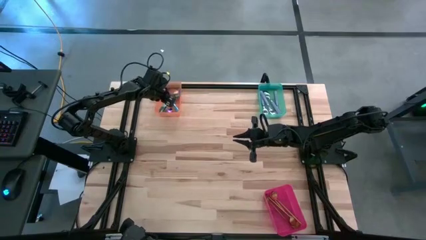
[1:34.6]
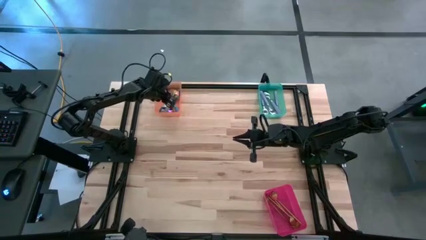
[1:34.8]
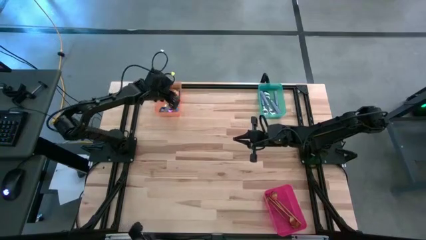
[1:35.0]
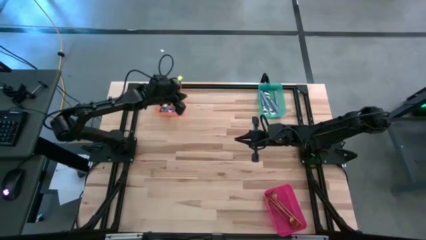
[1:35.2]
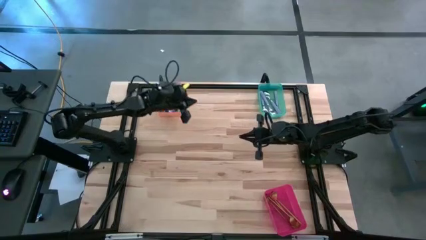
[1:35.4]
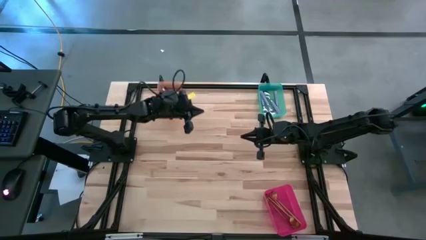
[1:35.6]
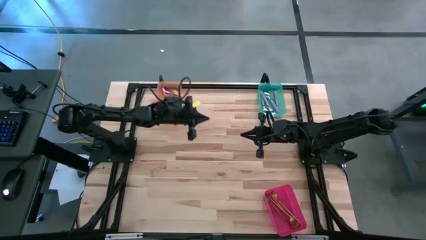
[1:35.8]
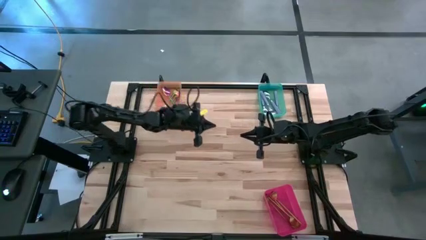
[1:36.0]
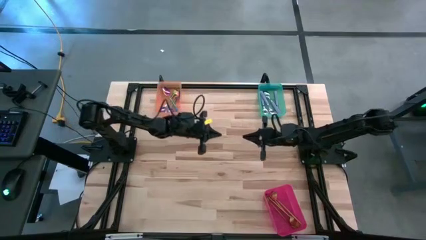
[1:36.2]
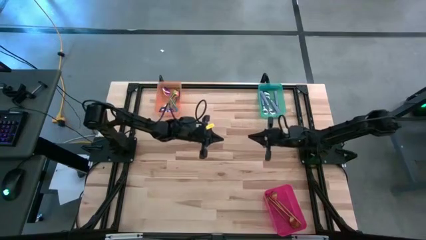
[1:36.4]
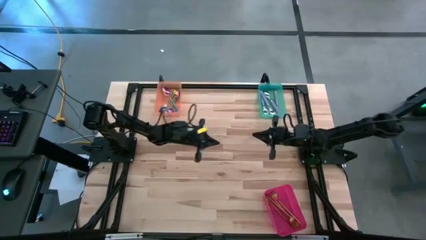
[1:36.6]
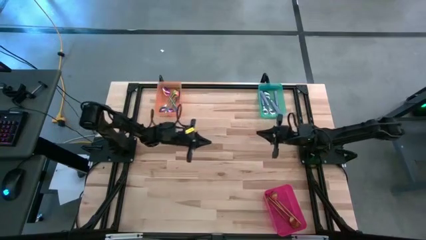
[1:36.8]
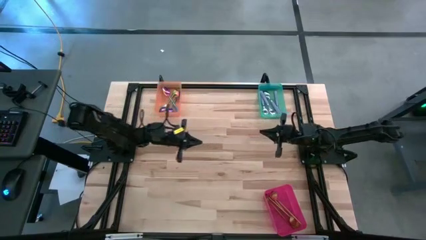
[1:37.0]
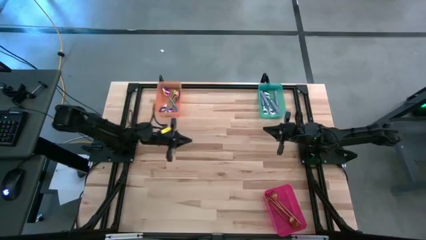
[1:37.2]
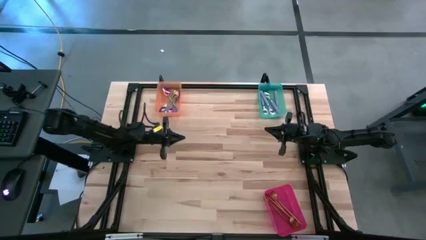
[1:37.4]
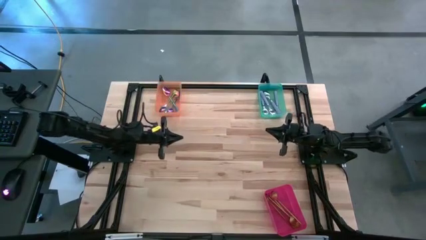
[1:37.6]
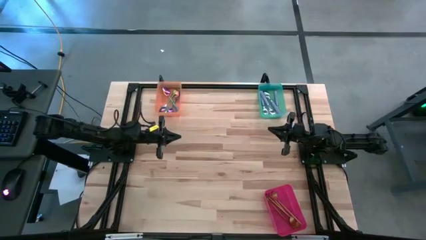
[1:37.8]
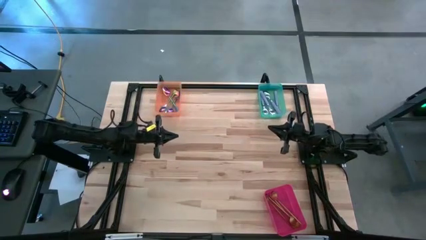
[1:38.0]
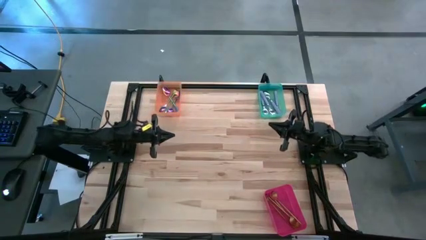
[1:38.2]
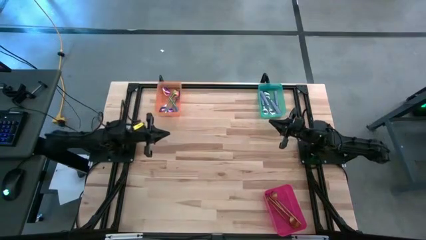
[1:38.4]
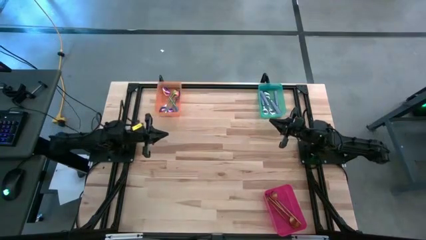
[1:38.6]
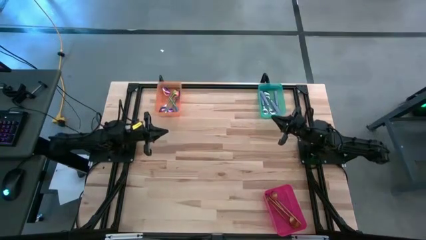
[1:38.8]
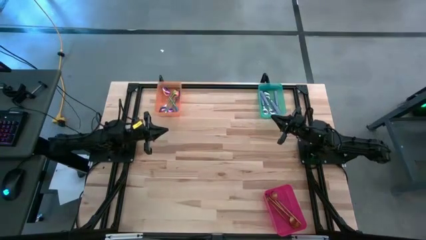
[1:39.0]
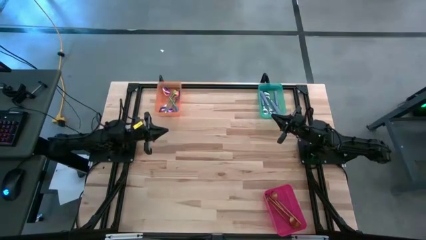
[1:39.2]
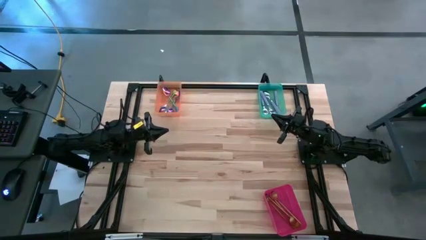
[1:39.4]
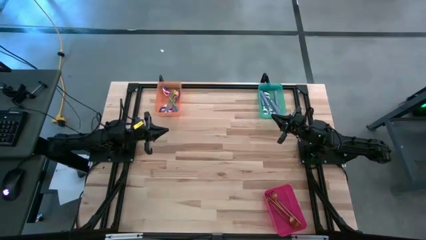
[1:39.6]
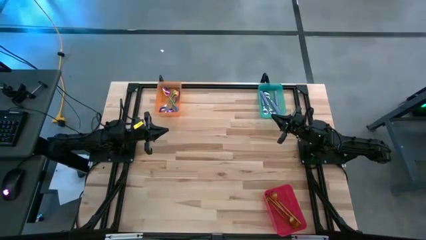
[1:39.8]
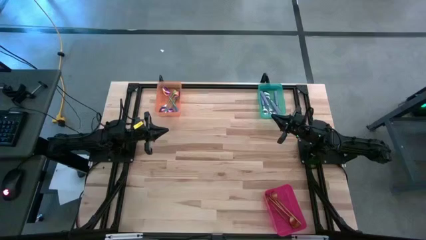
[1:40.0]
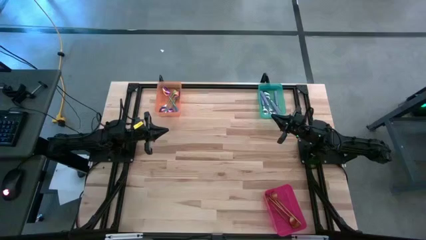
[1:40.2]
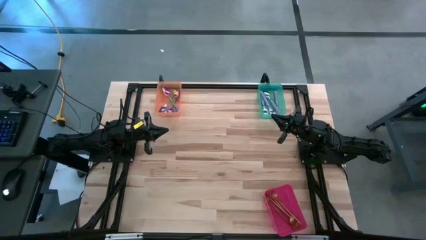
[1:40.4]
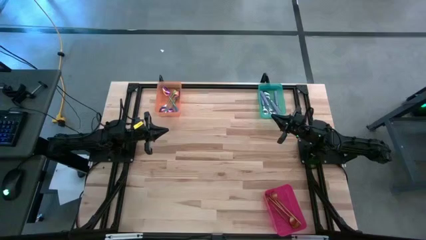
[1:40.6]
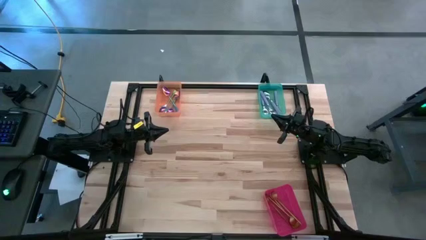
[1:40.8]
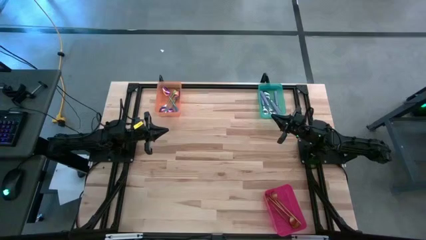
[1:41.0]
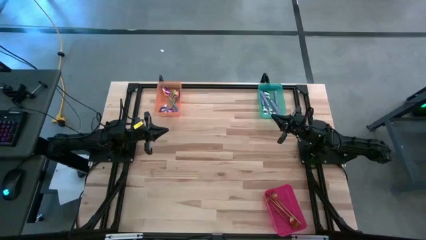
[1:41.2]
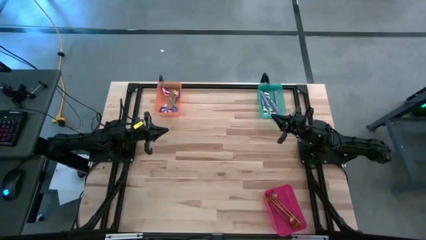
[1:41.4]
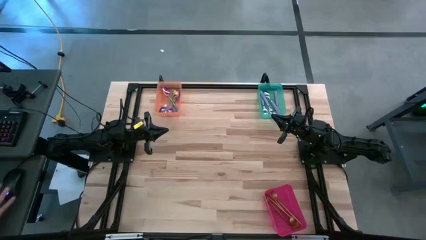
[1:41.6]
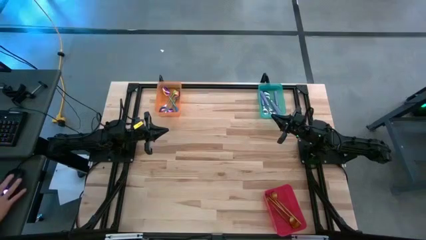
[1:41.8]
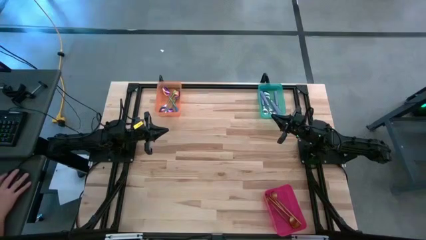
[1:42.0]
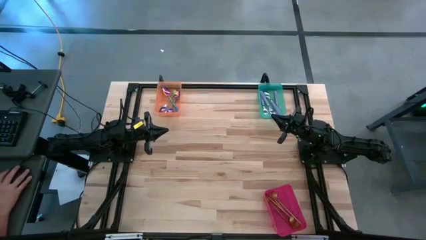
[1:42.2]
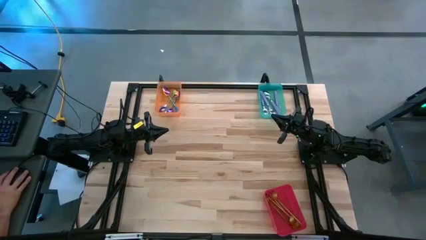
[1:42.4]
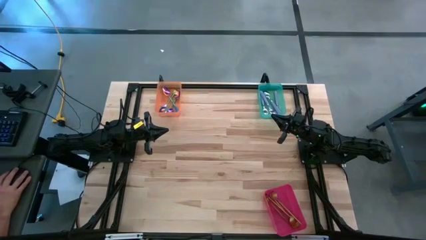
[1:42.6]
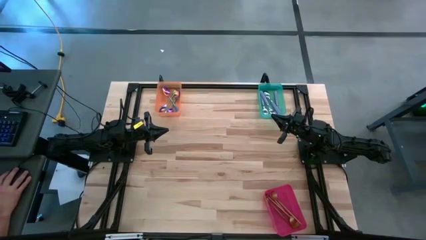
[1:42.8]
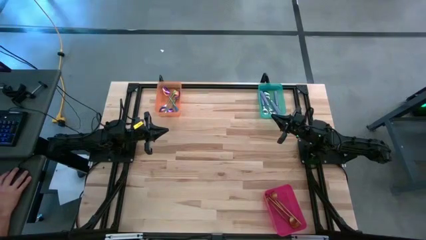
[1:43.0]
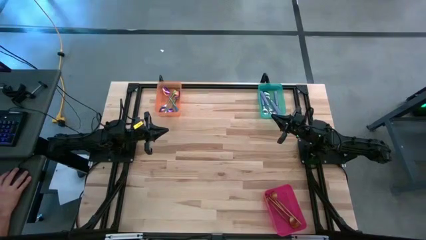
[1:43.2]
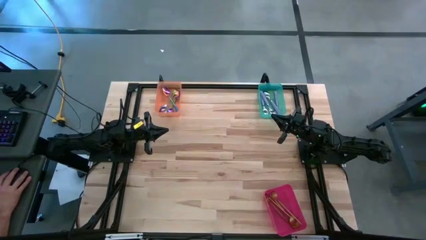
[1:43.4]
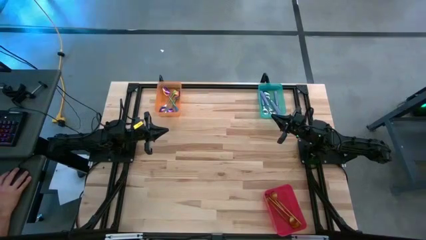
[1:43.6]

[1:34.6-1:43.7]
Task: Sort silverware by color (type)
Return to Home Position

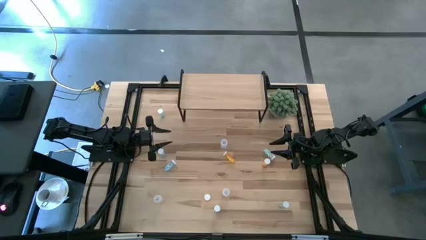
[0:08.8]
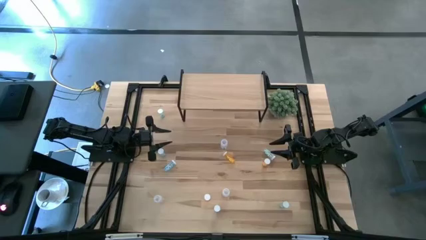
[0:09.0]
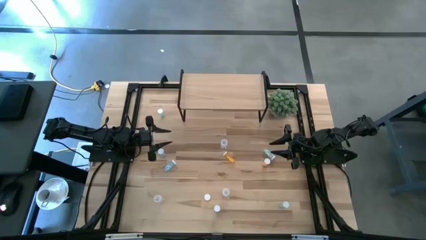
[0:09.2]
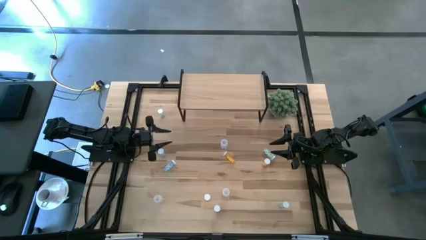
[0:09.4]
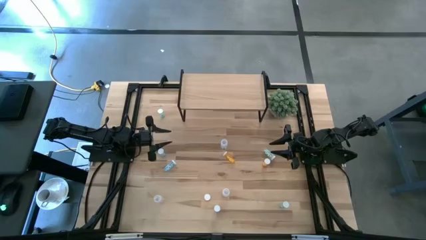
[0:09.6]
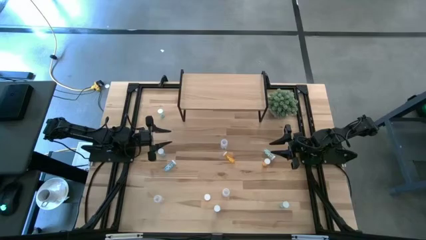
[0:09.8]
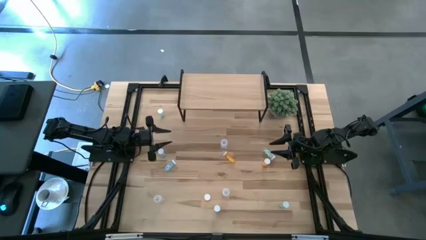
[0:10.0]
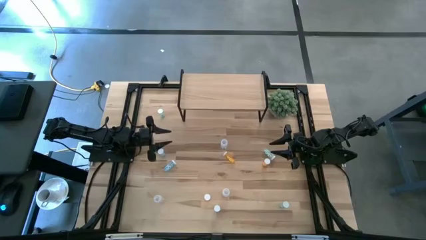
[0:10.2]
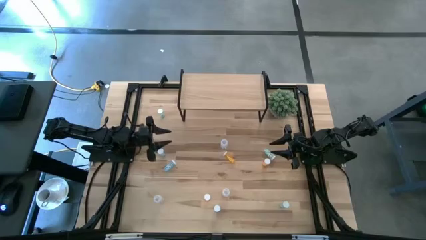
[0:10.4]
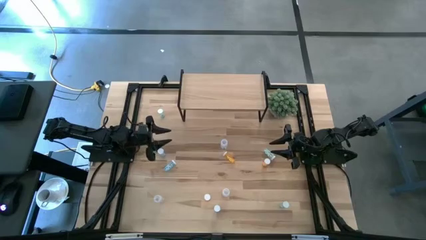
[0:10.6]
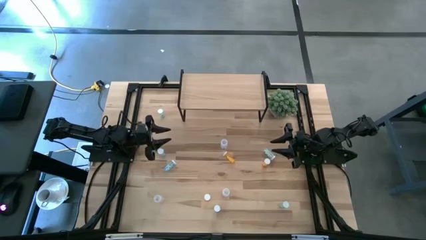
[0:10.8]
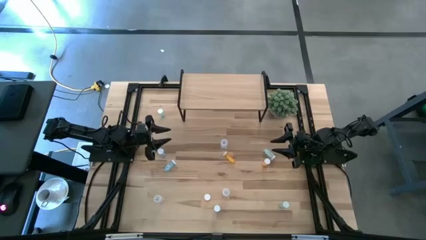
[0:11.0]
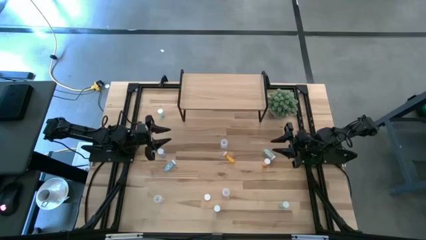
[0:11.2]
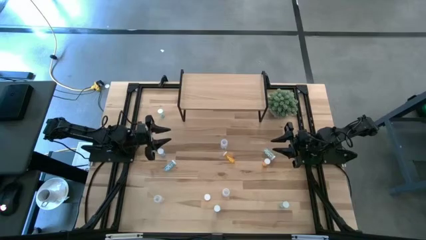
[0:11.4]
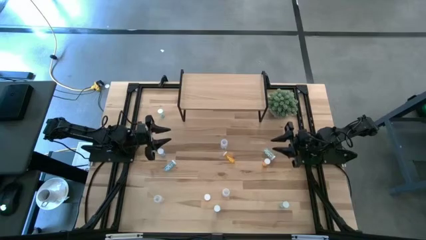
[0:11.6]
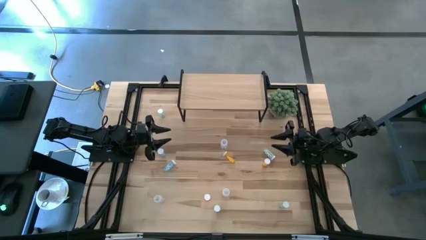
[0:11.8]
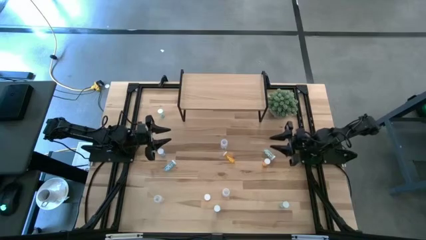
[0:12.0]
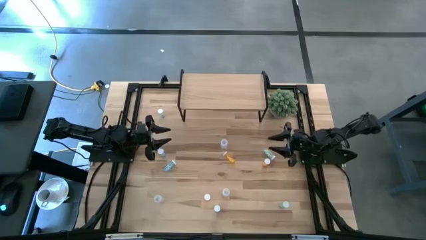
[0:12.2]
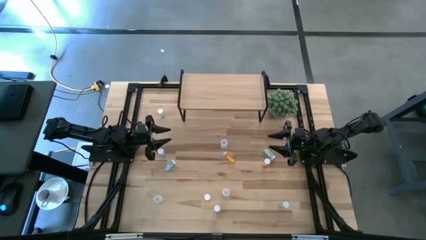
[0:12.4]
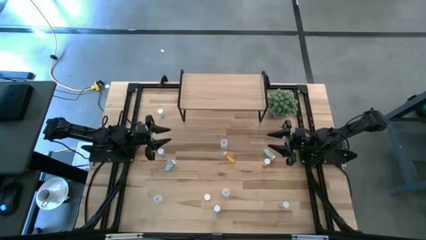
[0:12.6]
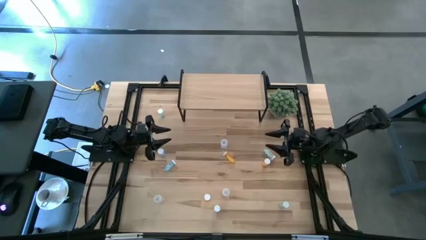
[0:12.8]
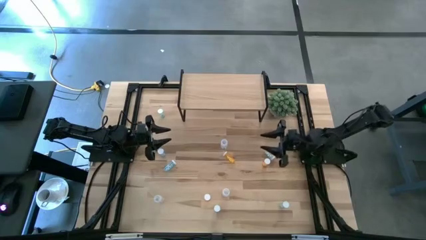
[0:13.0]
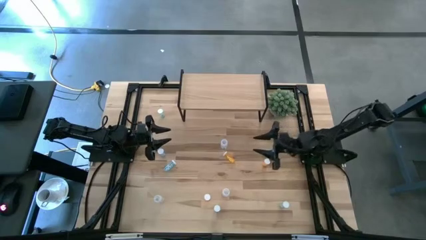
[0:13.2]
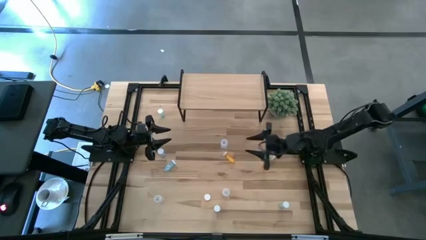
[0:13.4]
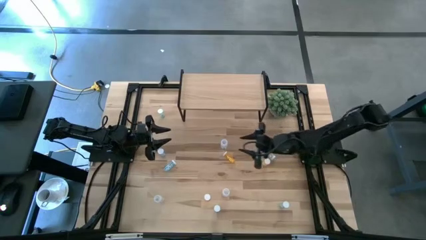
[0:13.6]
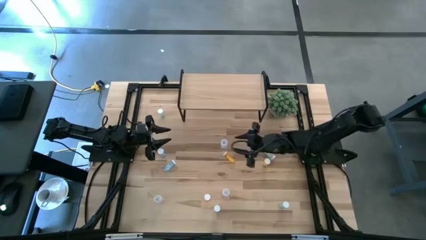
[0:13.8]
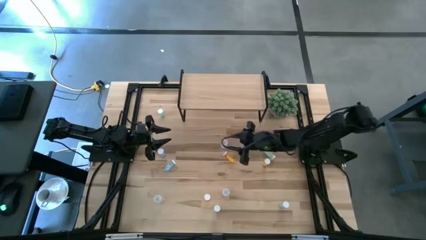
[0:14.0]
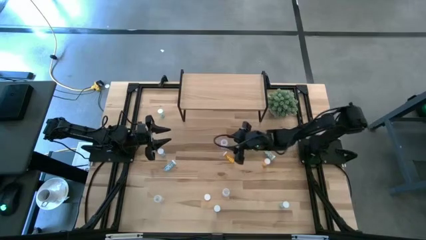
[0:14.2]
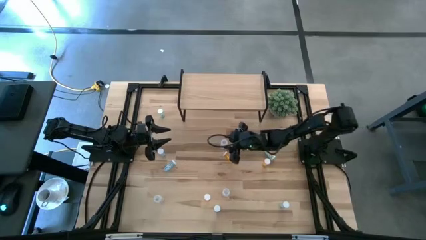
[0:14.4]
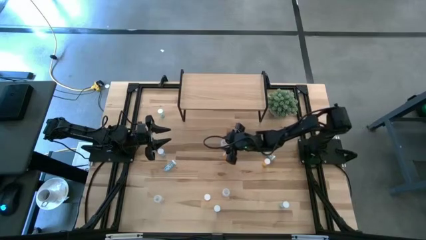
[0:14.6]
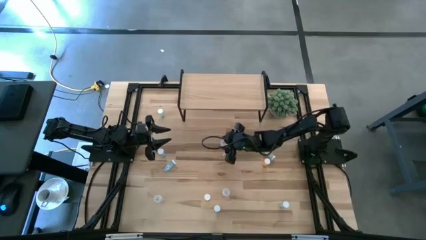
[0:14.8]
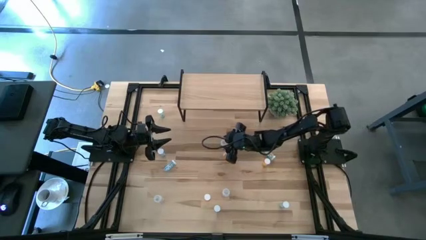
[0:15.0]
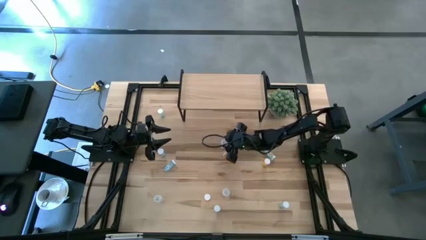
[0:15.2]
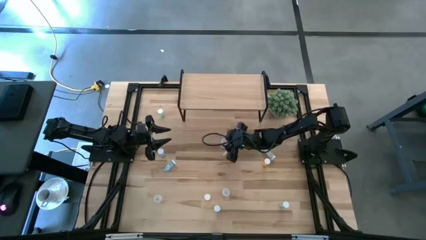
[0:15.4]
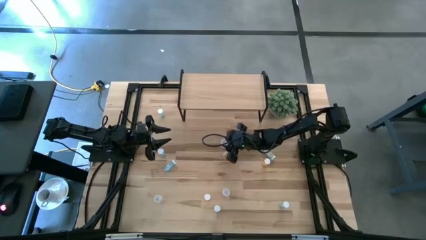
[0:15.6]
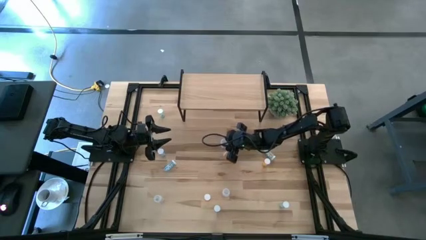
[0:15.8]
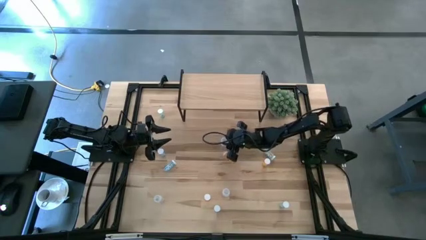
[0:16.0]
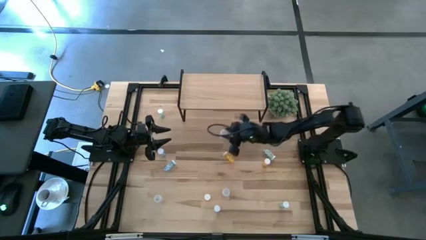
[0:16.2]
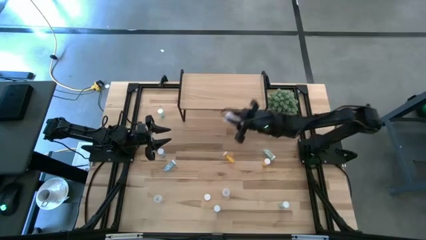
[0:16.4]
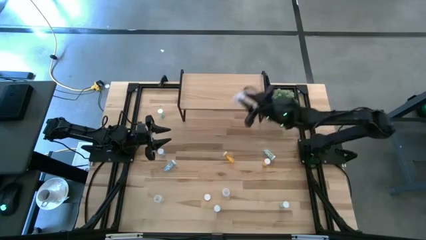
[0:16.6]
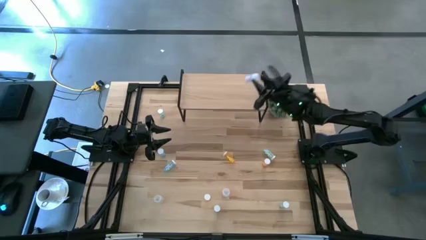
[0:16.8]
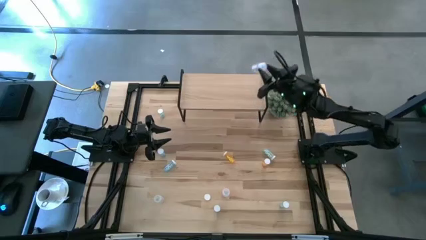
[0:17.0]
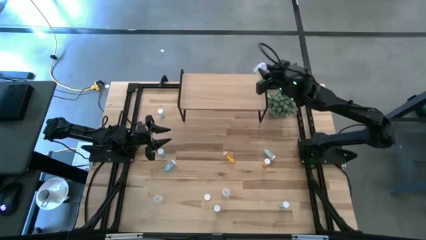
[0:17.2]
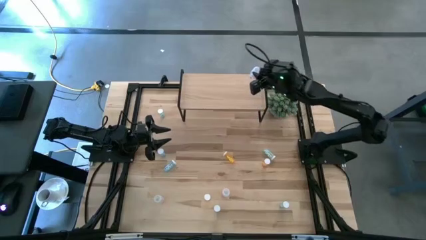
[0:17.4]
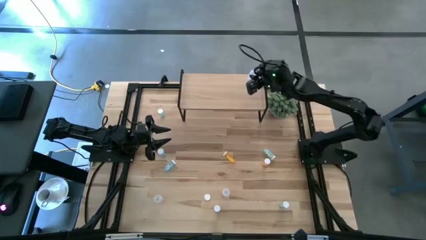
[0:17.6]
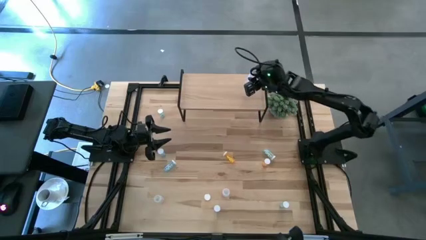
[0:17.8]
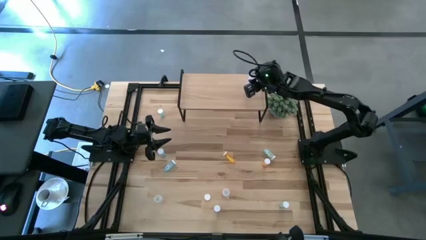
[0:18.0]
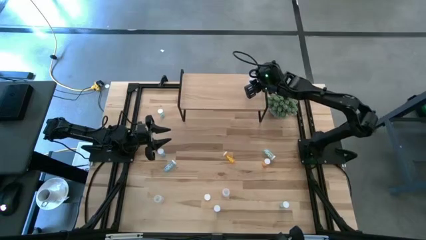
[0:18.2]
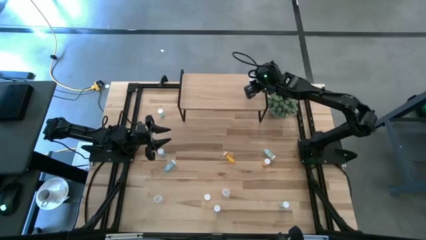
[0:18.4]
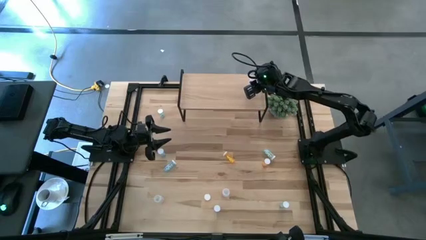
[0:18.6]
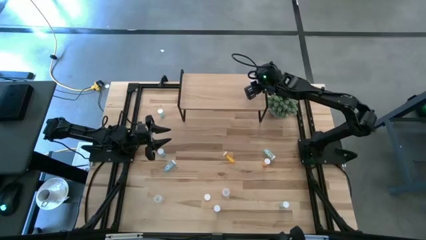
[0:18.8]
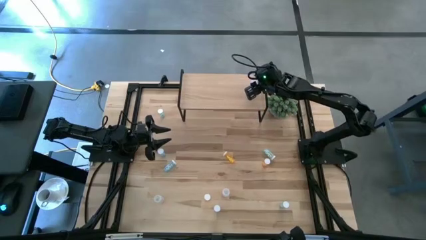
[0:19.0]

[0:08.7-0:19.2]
Task: Pick and place medicine bottles onto shelf by color
Put the top right transparent pill bottle on the shelf
